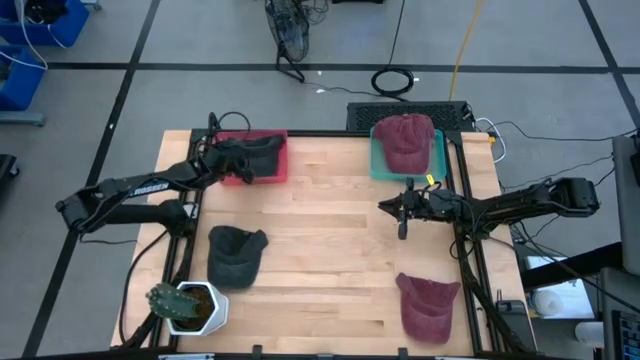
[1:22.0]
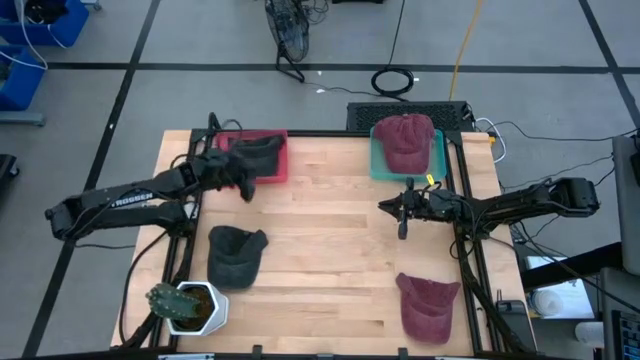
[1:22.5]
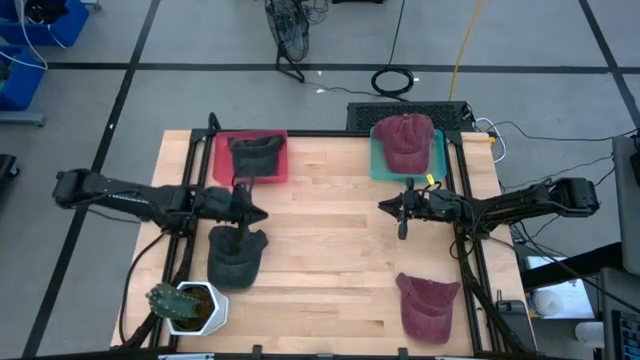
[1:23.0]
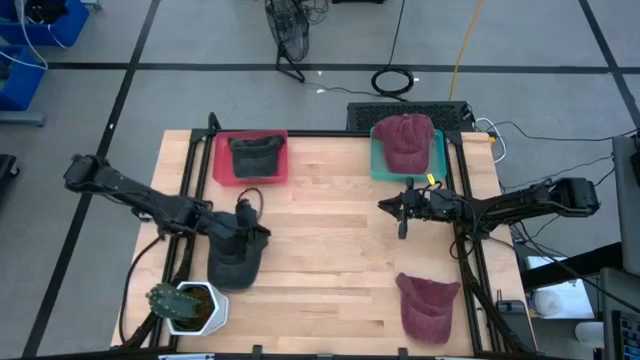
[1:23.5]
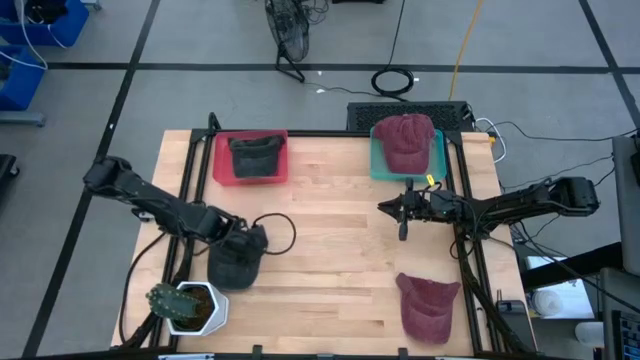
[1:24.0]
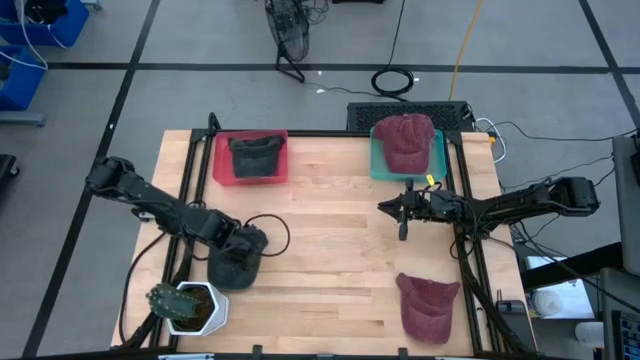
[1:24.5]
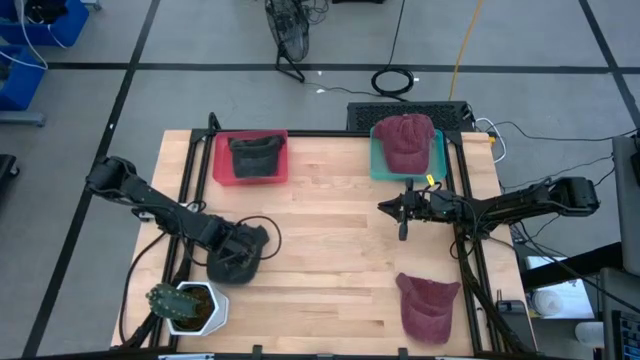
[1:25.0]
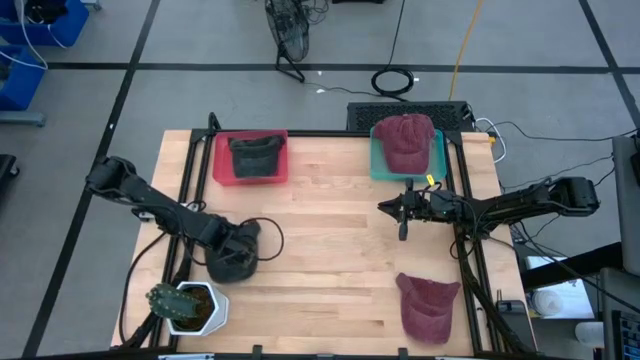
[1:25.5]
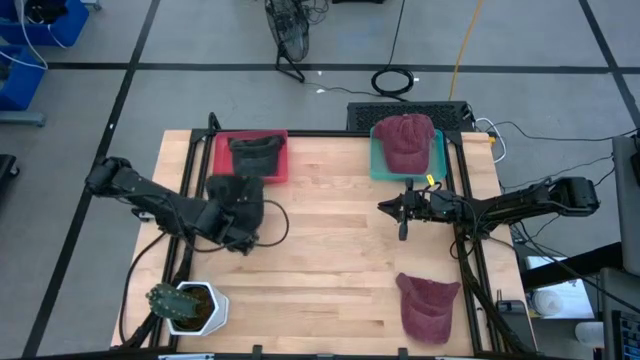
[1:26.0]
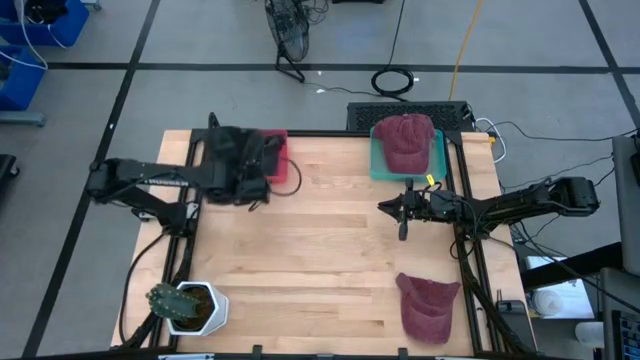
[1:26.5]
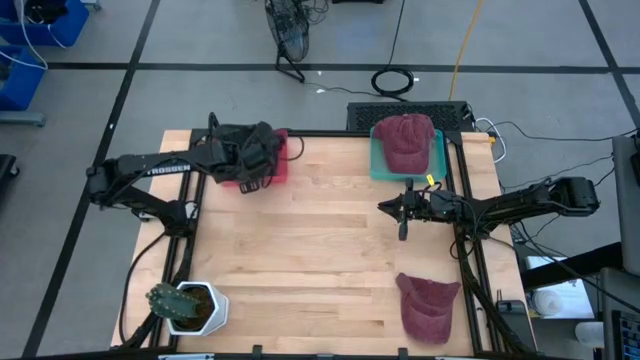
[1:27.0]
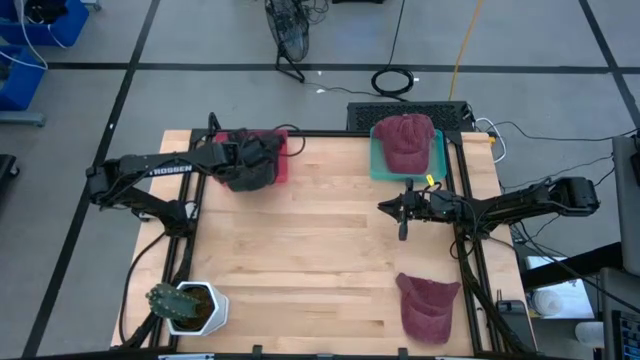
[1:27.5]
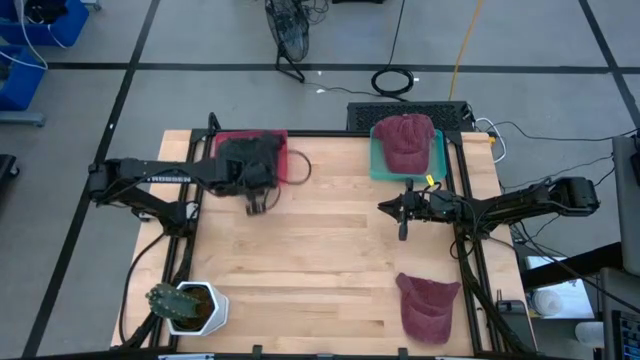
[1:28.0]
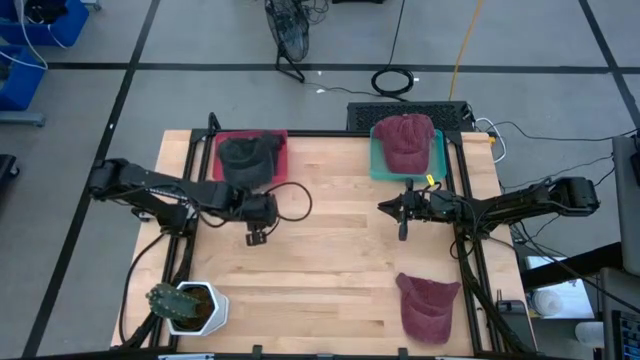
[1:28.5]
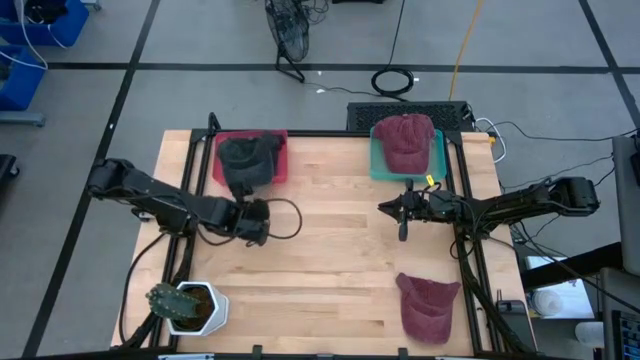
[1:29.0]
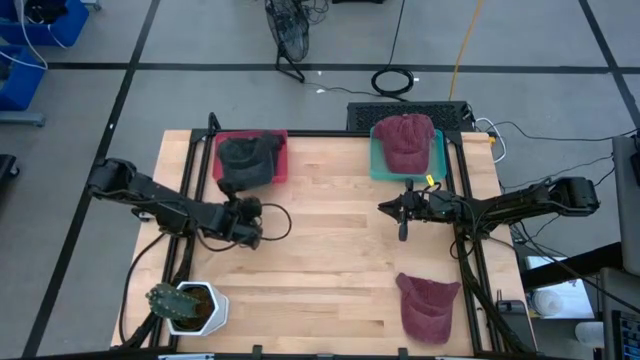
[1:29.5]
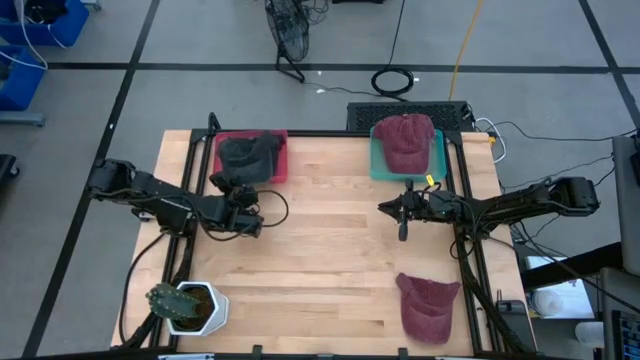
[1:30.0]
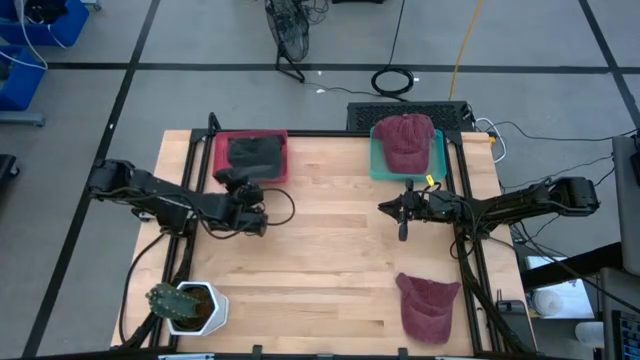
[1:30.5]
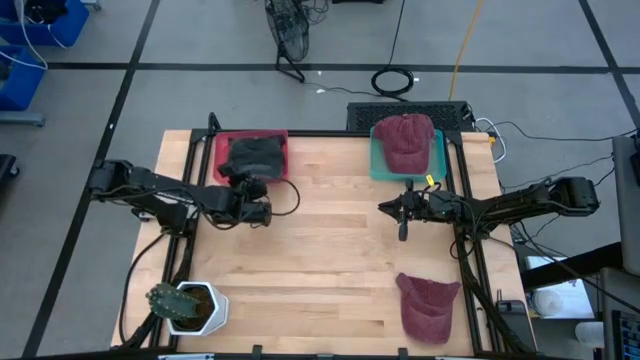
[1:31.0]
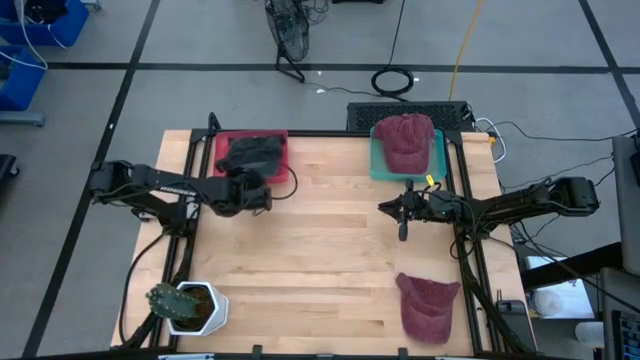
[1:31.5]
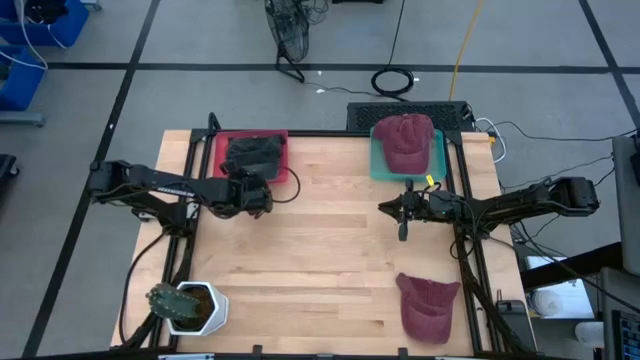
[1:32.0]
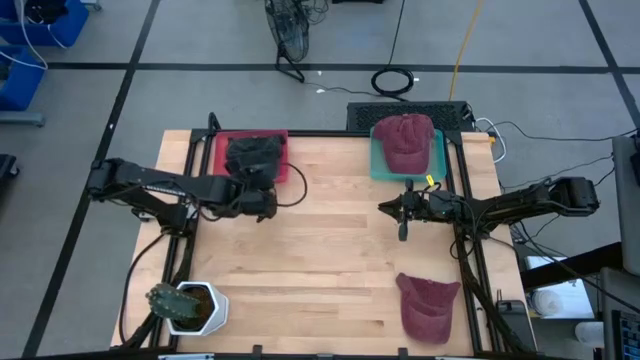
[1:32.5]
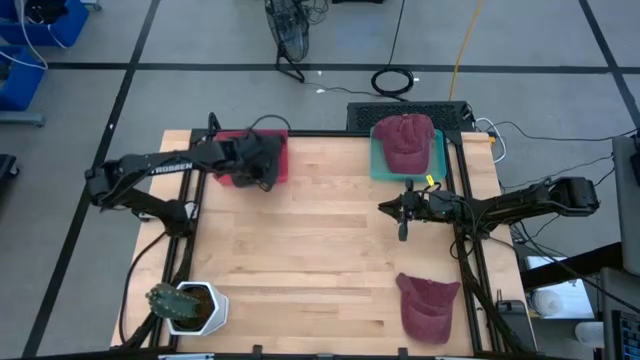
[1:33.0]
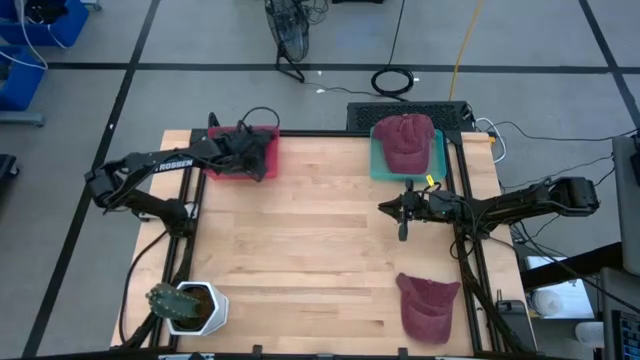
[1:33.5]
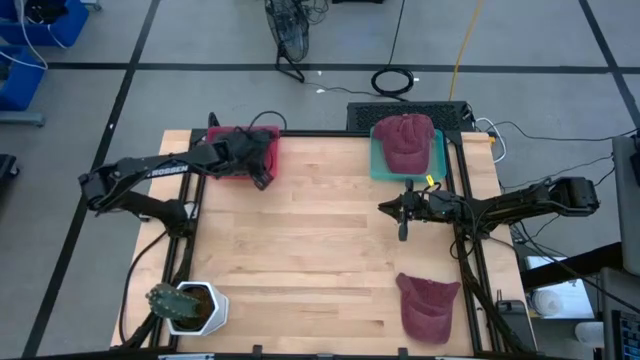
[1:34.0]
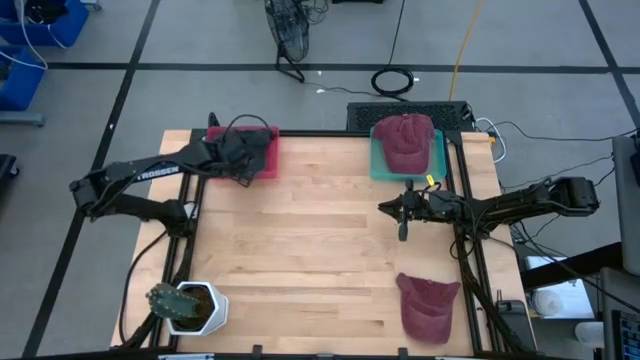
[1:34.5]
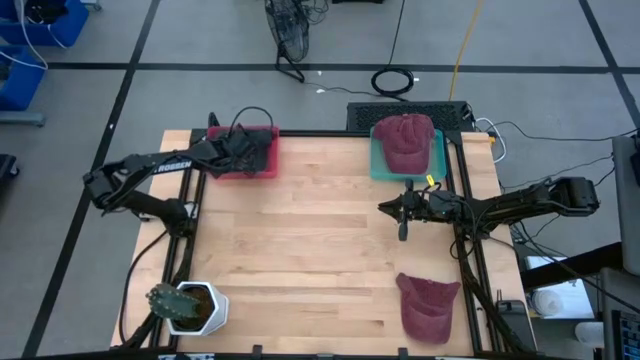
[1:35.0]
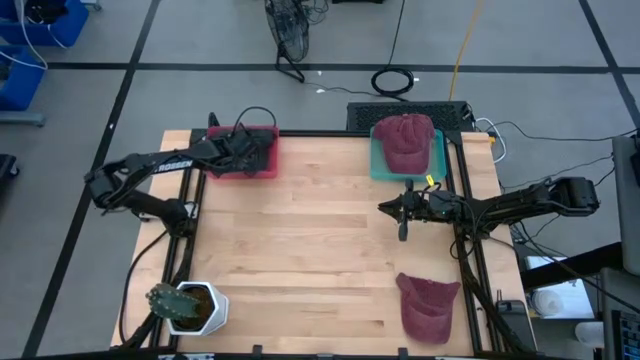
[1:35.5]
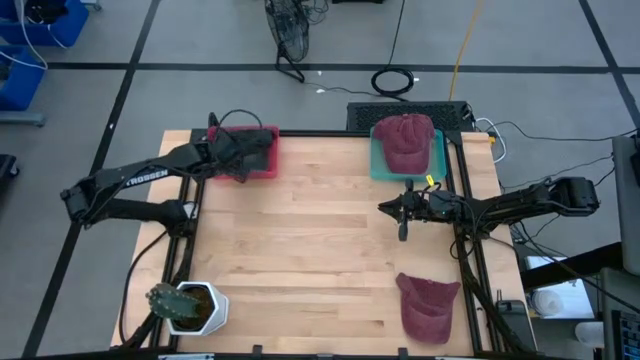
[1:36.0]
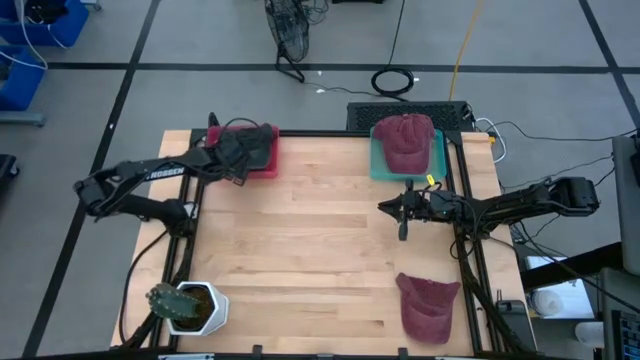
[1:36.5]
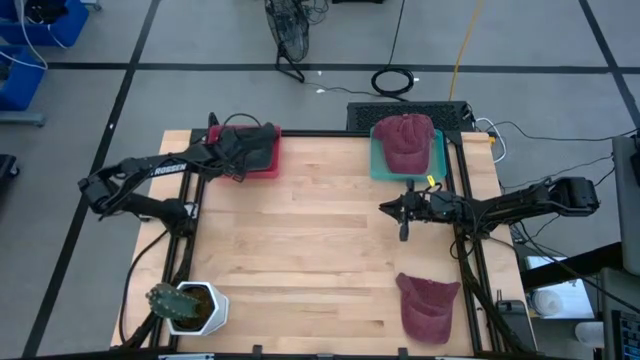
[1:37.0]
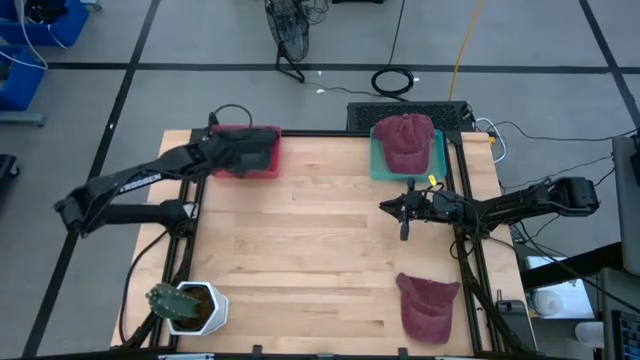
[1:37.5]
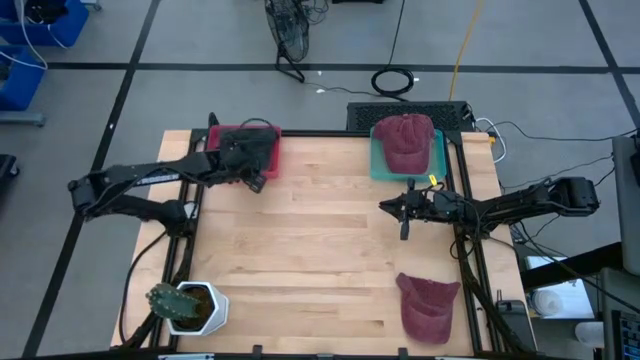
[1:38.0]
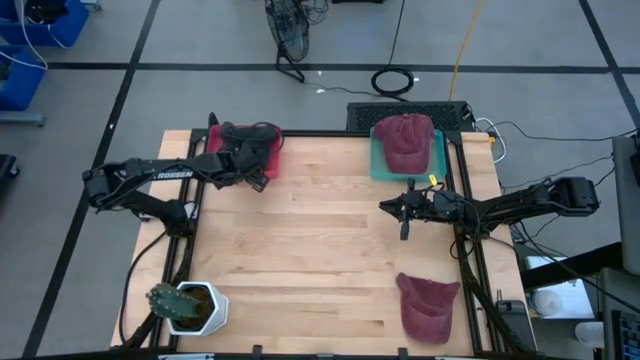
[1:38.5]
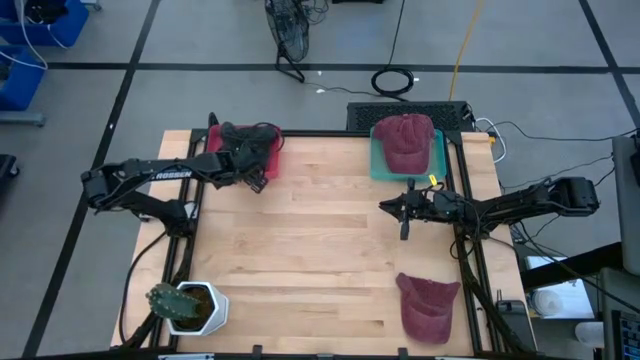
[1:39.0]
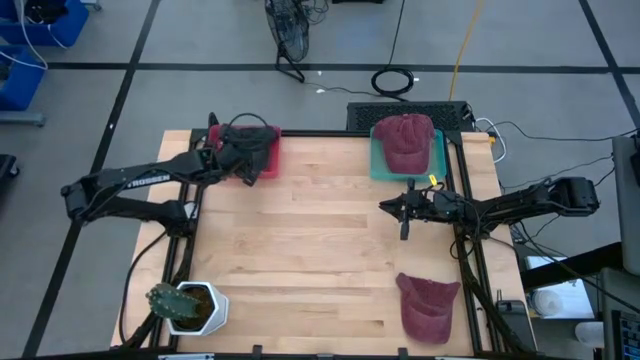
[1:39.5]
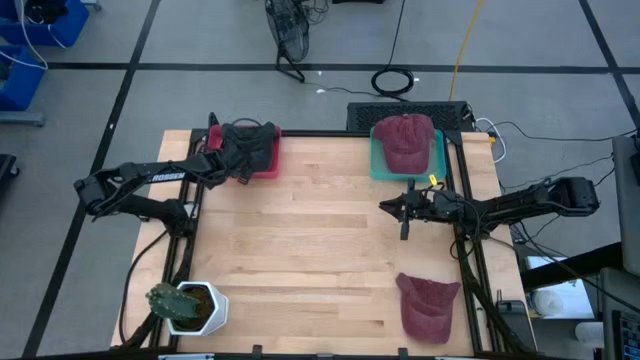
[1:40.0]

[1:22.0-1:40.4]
Task: Pick & Place hat
Put the black cap into the red bin

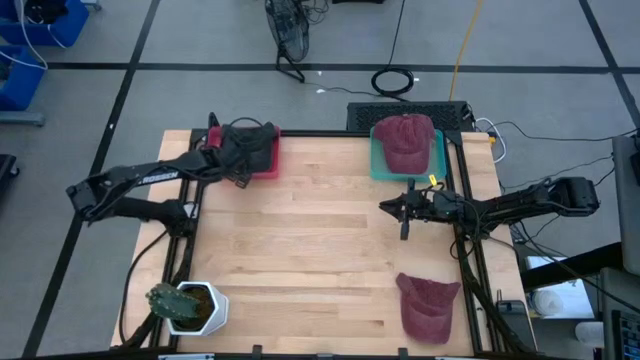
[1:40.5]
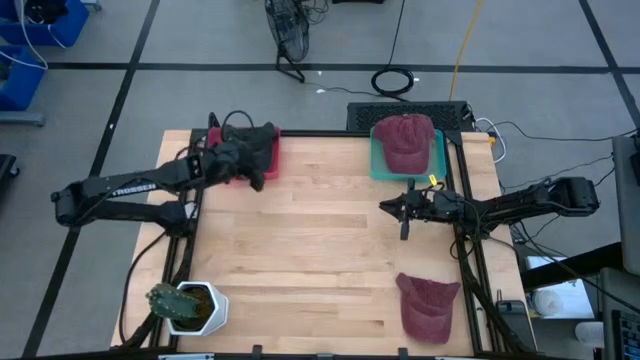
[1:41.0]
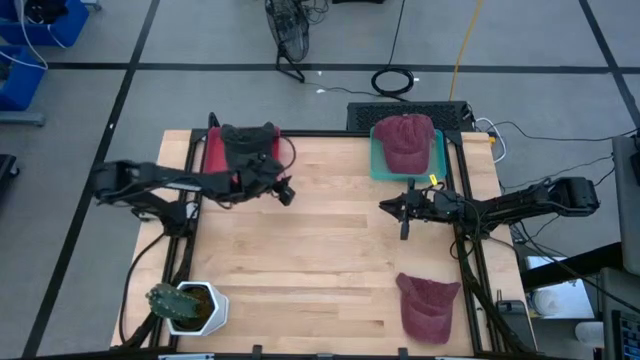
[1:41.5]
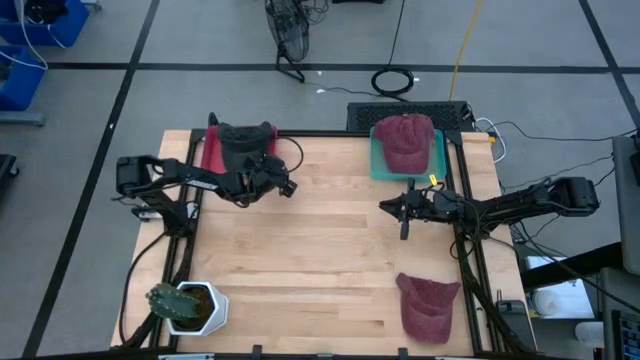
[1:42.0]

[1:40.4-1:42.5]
Adjust the red bin on the table

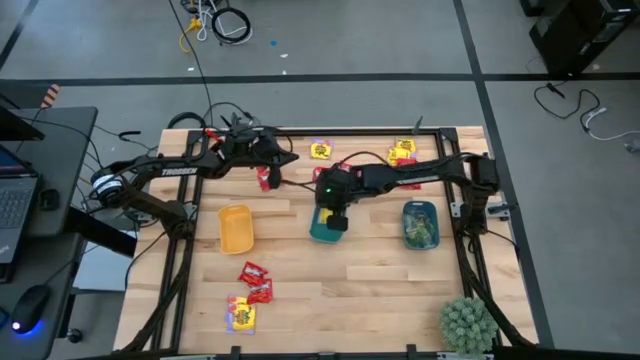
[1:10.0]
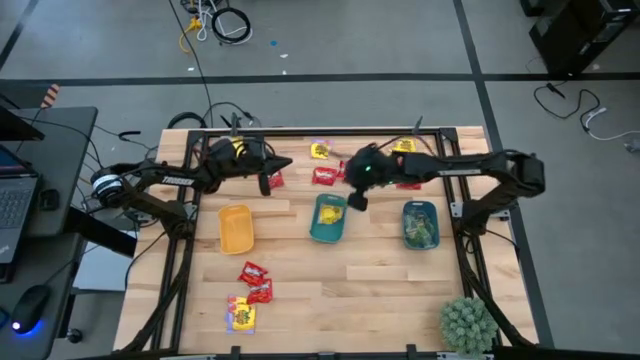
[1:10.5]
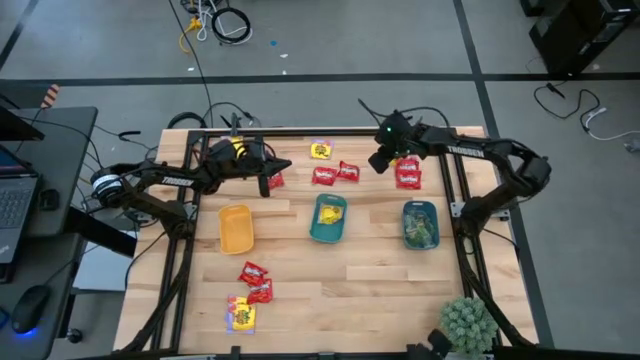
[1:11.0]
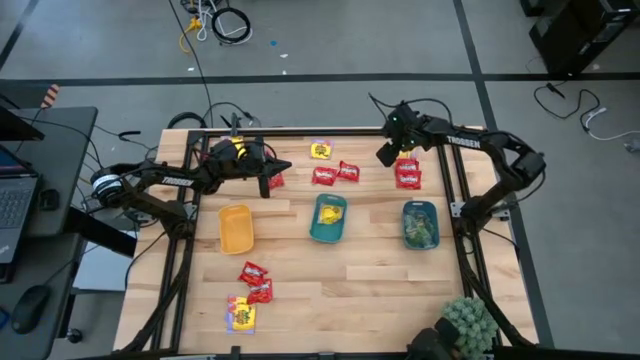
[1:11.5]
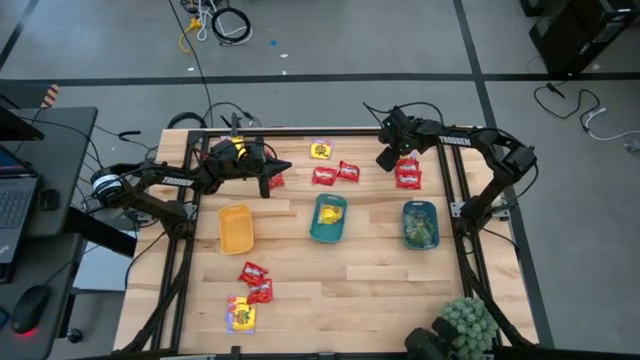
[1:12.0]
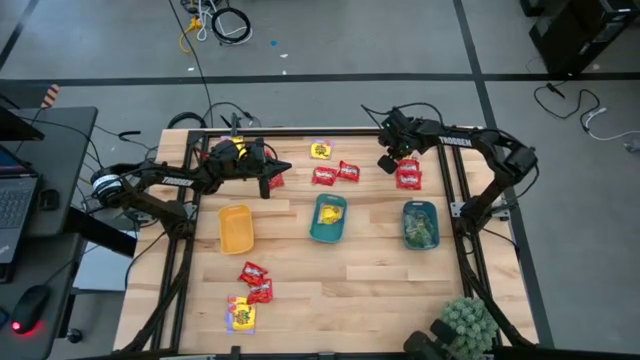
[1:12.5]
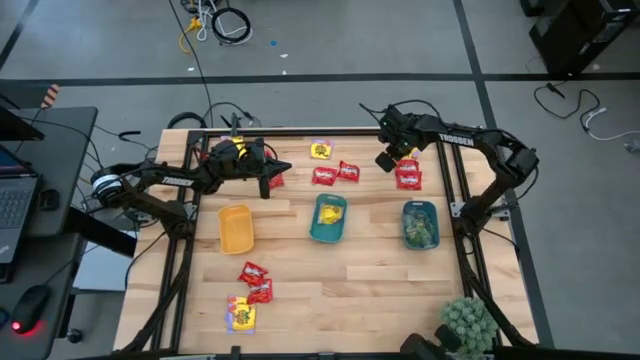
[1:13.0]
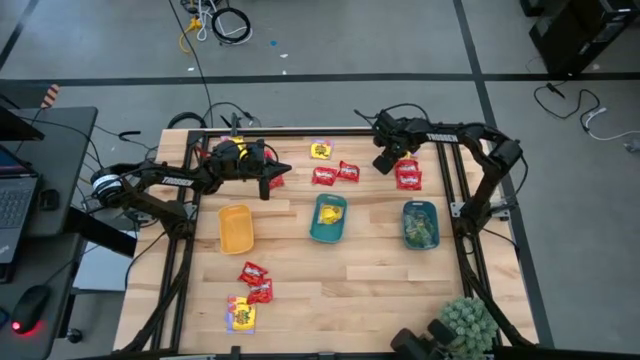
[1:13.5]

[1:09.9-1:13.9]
Task: Sort candy
Put the yellow candy pack into the green bin
